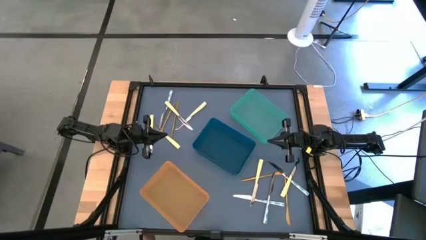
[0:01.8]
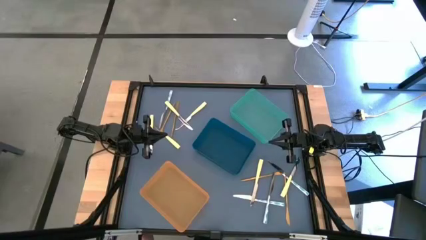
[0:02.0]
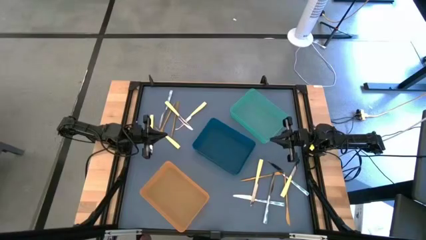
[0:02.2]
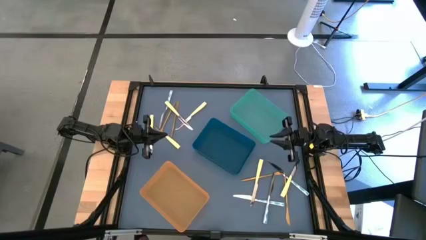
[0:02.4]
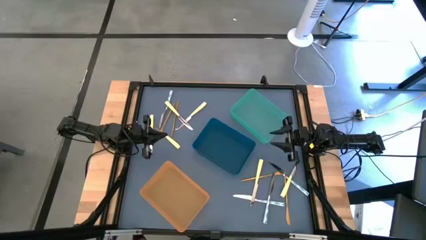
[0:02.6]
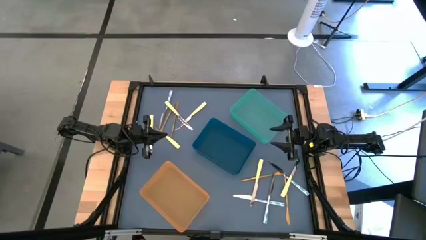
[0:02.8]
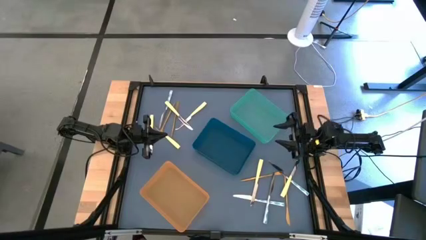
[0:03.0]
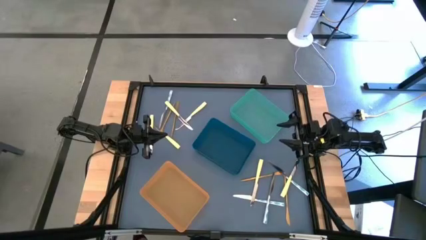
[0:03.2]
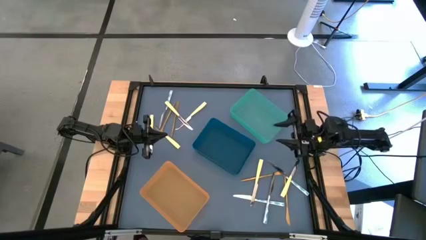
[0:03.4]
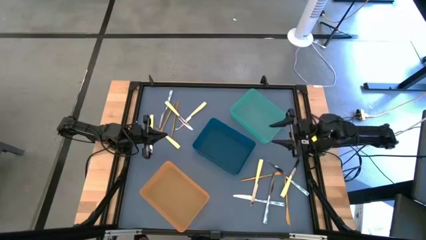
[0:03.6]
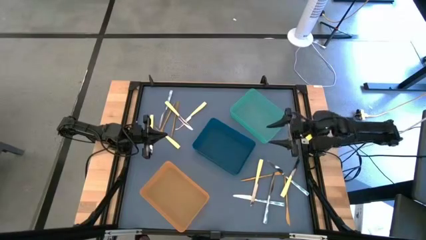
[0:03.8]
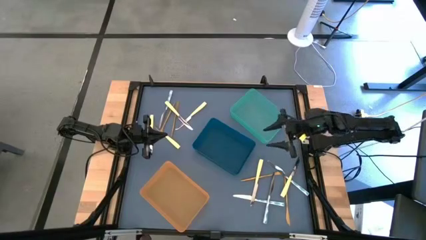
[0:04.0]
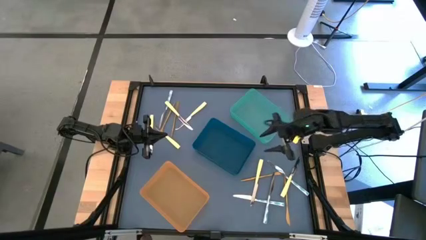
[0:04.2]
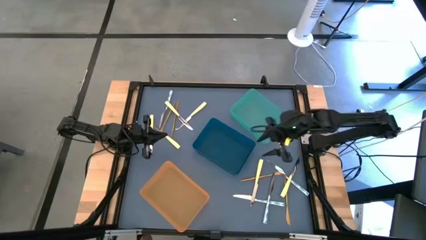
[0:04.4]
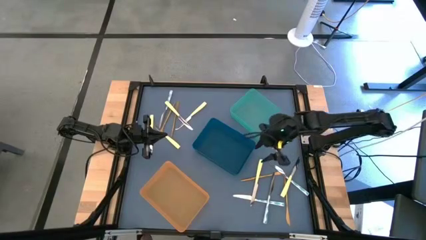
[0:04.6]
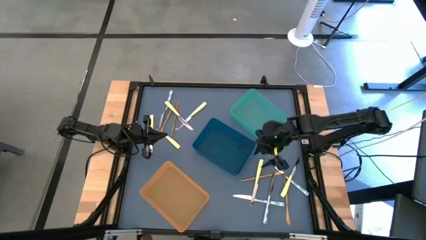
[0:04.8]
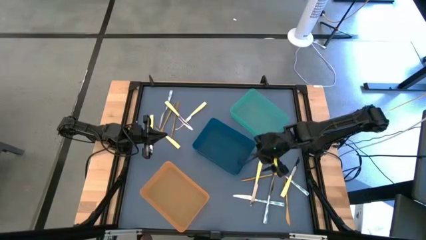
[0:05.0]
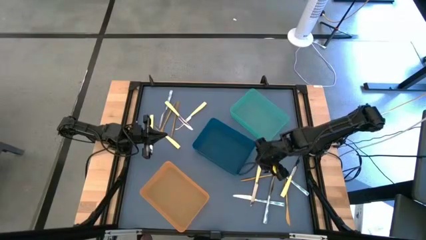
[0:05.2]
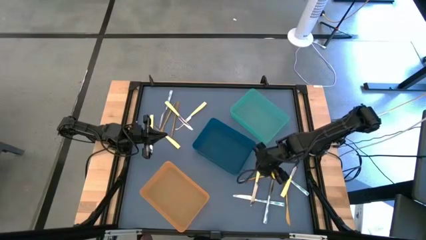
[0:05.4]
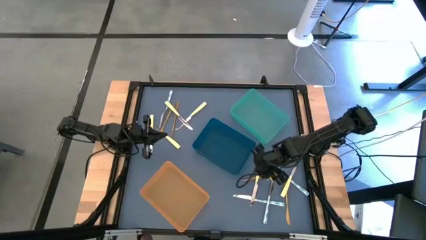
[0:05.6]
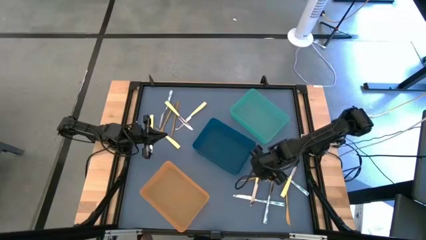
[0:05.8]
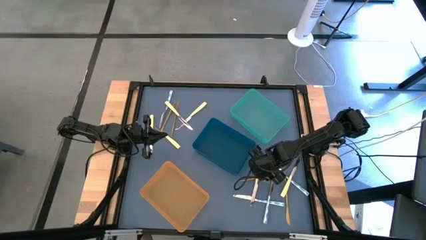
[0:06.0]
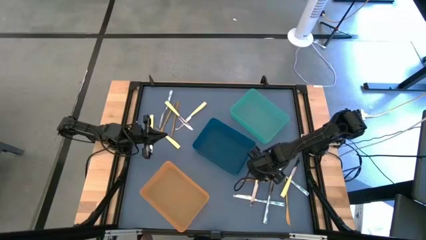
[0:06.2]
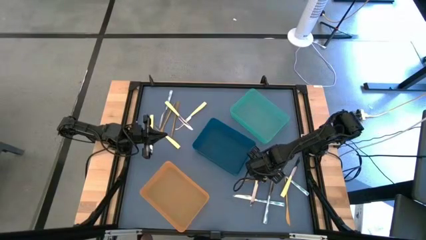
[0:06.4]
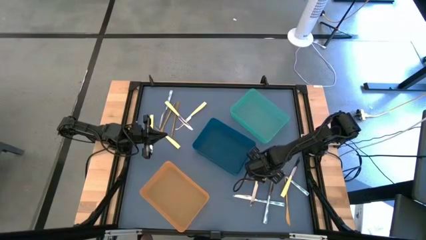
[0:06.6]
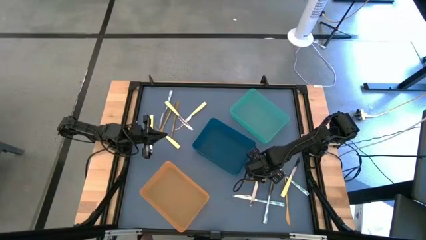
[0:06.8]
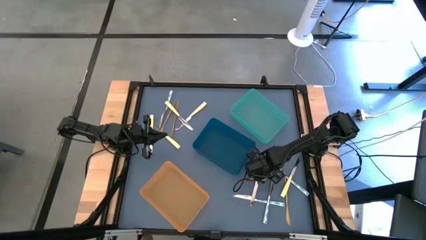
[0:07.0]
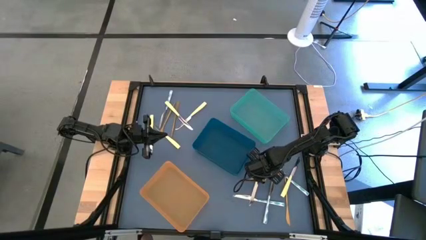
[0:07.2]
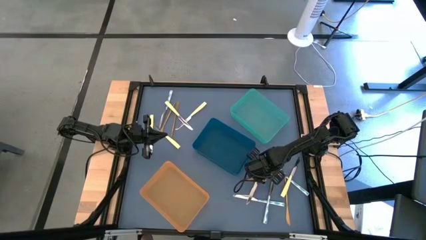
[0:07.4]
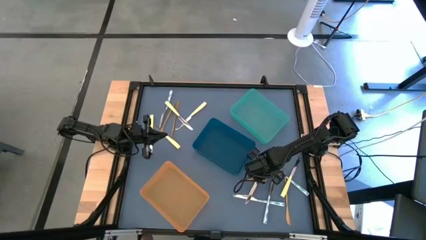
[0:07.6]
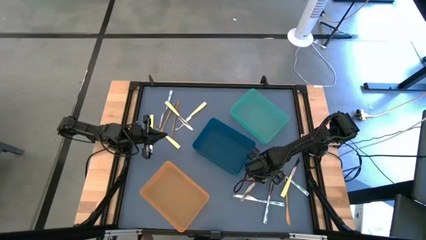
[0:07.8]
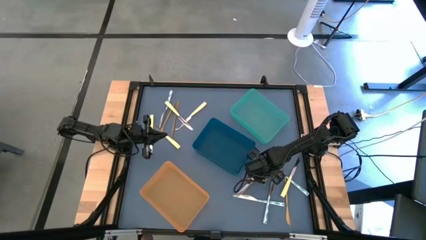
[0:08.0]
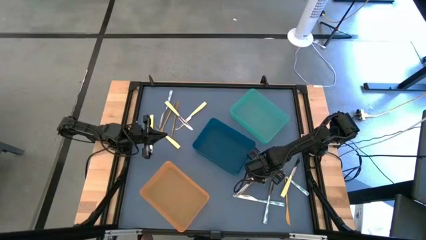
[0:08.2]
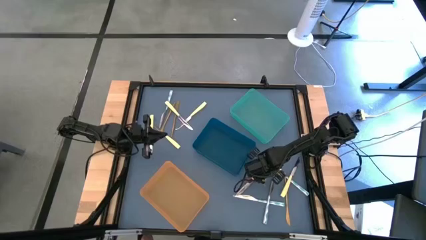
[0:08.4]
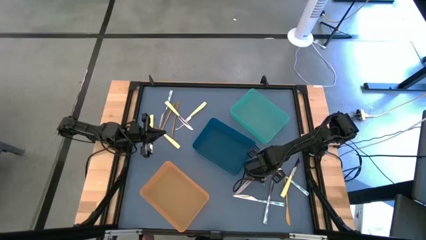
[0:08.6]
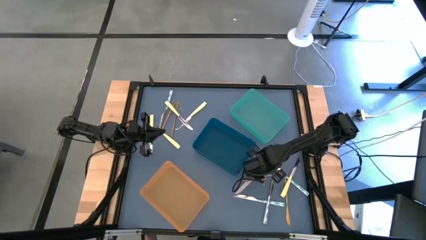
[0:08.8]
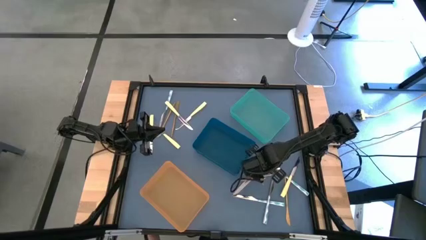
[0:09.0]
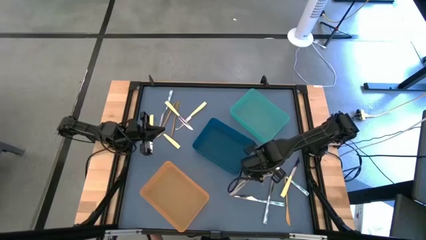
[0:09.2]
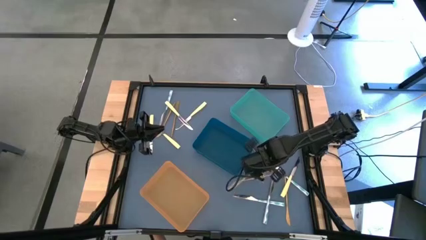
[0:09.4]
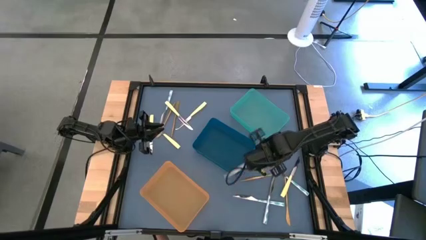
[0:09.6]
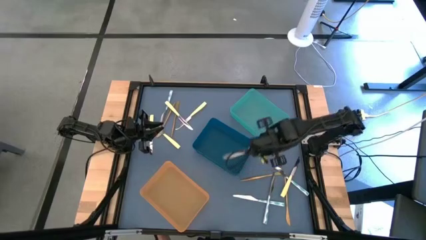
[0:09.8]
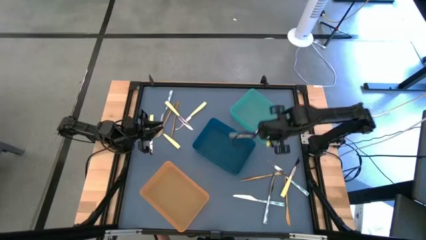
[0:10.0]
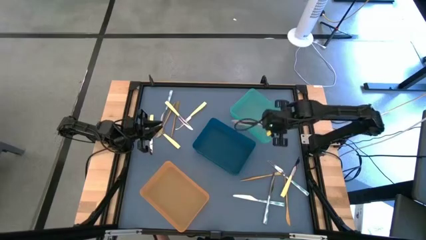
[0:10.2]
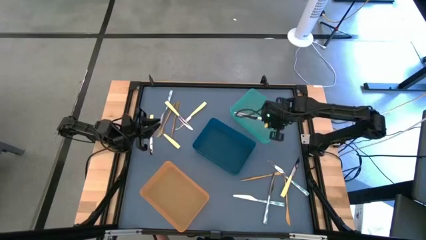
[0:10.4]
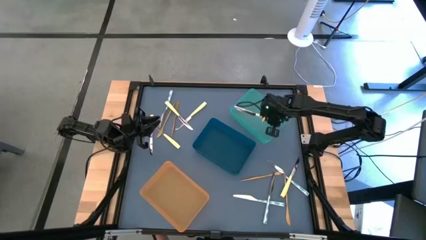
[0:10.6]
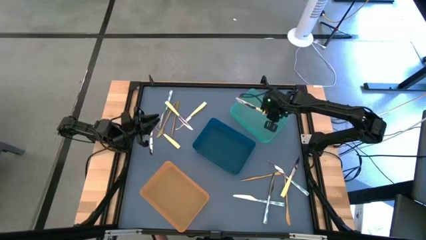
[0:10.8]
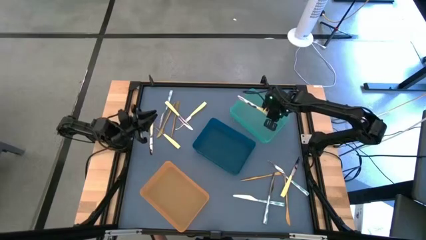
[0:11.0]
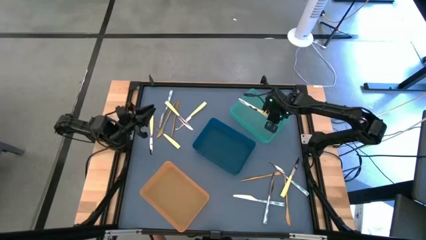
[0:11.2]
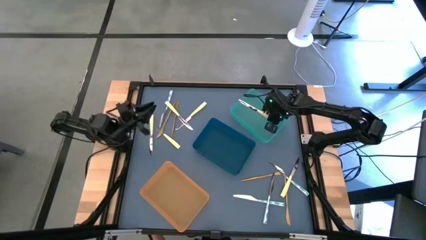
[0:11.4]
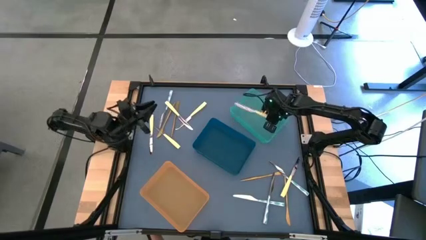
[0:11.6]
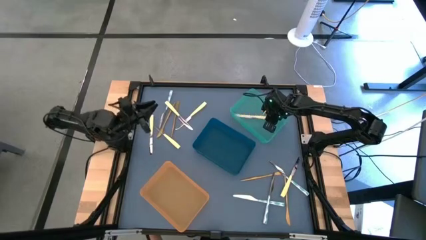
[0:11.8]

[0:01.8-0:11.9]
Task: Sort silverware by color (type)
Put the left yellow knife into the light blue bin

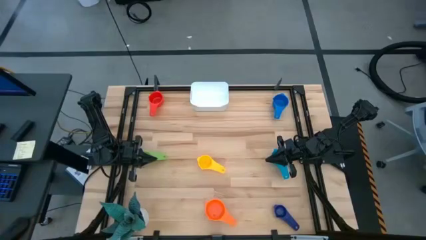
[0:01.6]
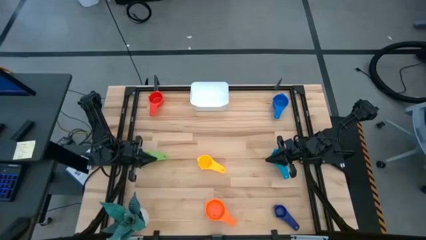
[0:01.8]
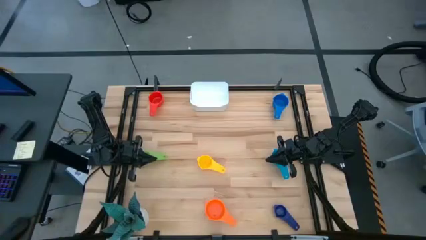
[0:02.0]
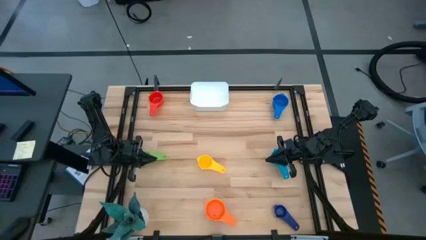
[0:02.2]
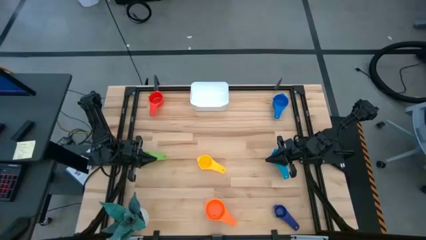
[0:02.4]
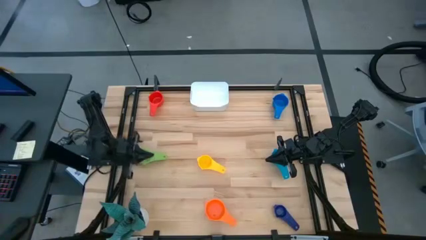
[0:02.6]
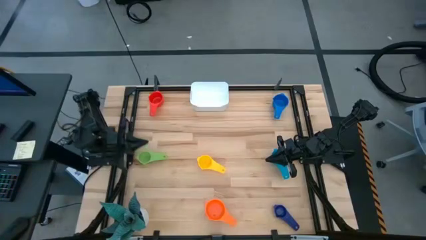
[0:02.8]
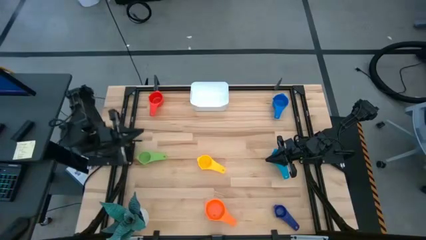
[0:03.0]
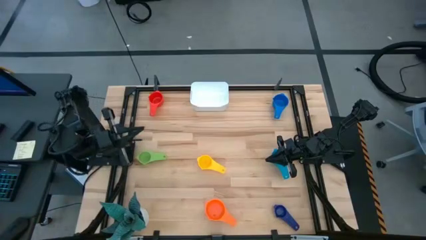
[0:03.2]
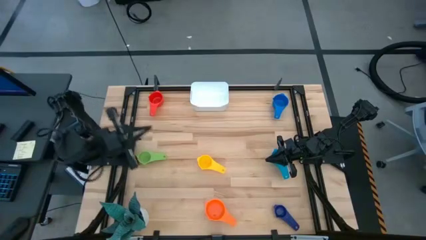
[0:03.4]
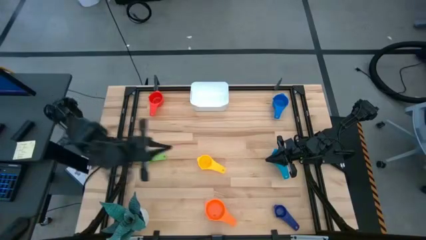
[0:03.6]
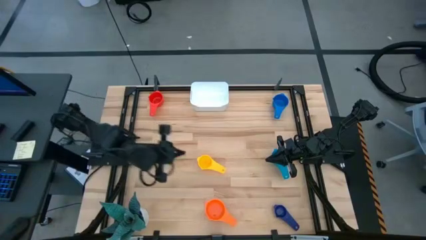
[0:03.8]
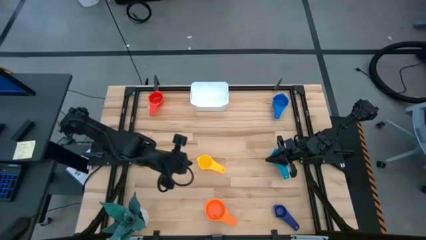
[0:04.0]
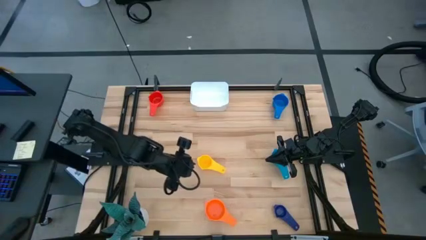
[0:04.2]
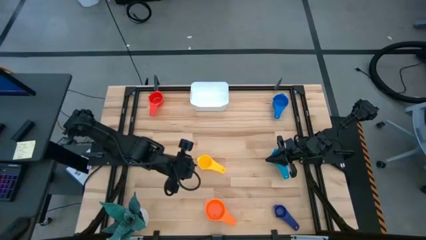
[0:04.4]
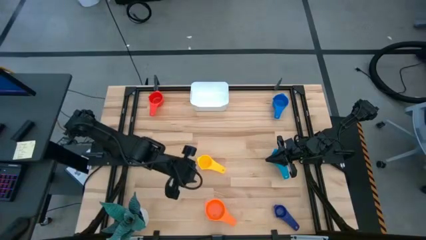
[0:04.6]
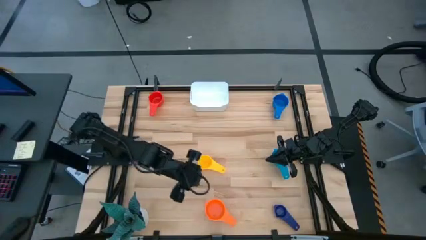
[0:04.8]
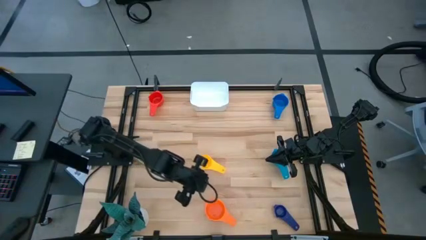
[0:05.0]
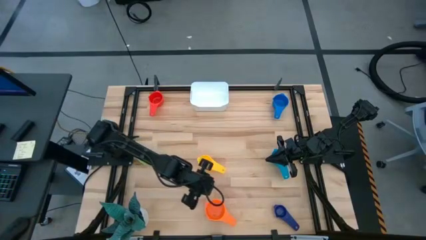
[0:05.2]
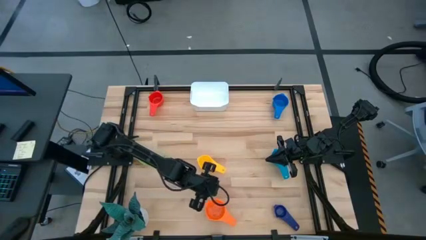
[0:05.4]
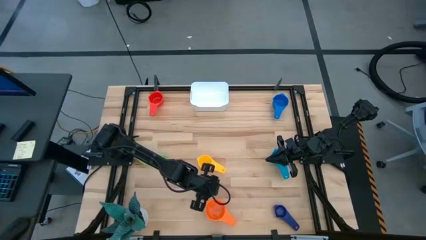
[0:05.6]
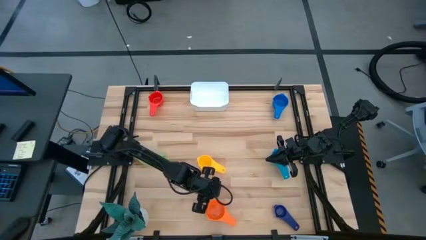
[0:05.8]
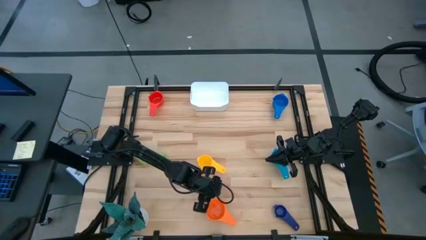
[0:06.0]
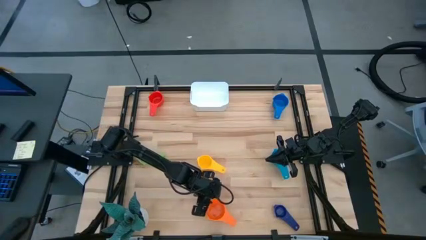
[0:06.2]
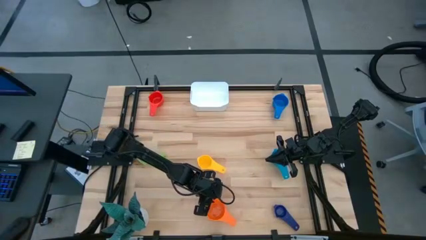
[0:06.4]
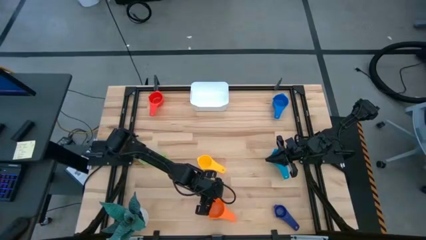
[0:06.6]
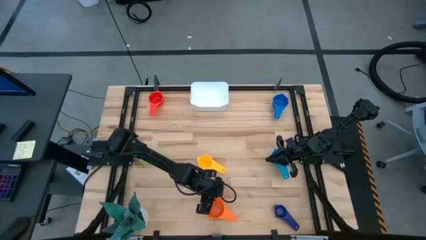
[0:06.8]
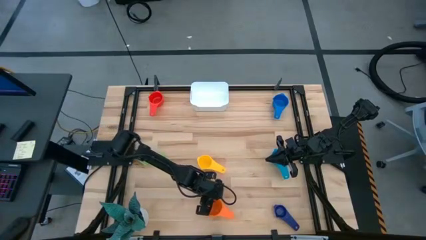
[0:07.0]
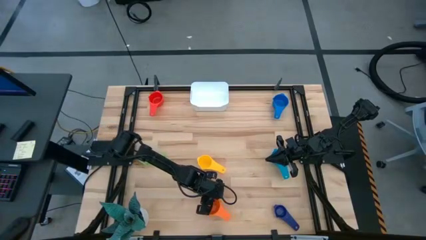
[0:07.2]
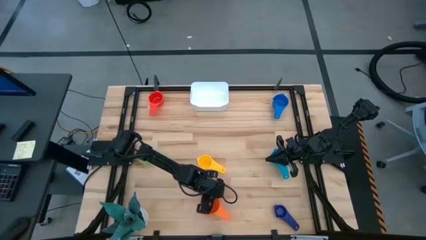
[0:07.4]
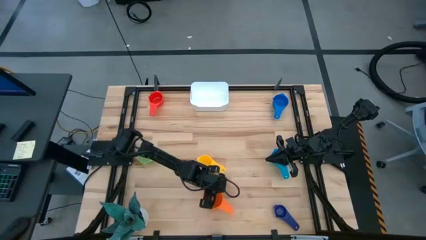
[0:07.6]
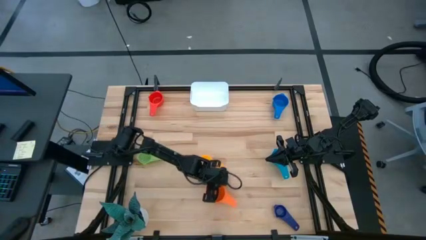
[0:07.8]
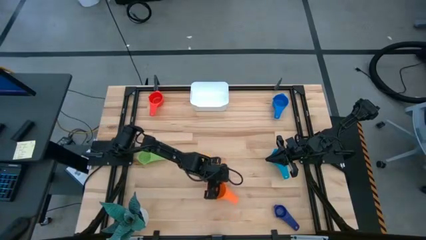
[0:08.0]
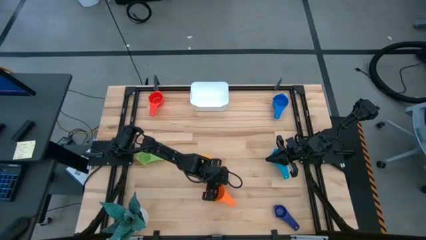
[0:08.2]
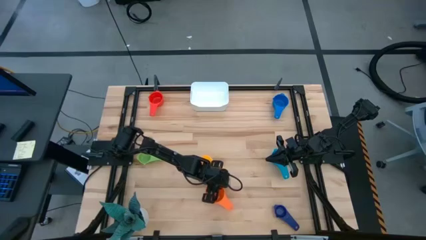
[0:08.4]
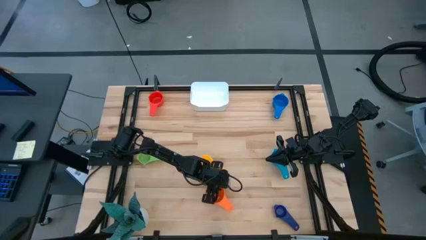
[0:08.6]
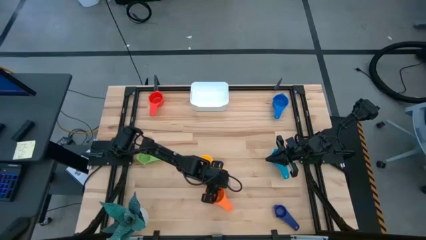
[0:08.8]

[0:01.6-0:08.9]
Task: Nest measuring cups in basket
Adjust the orange measuring cup
